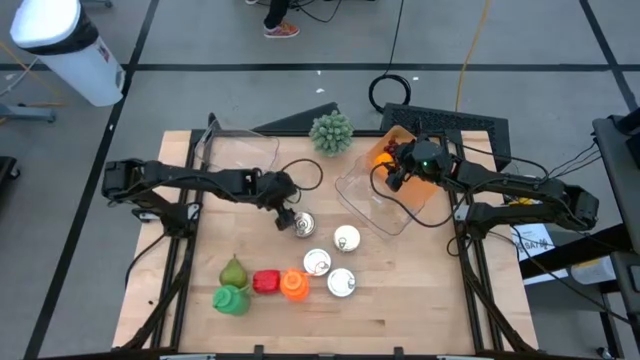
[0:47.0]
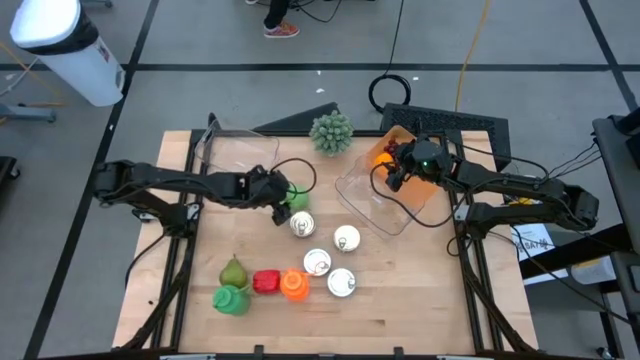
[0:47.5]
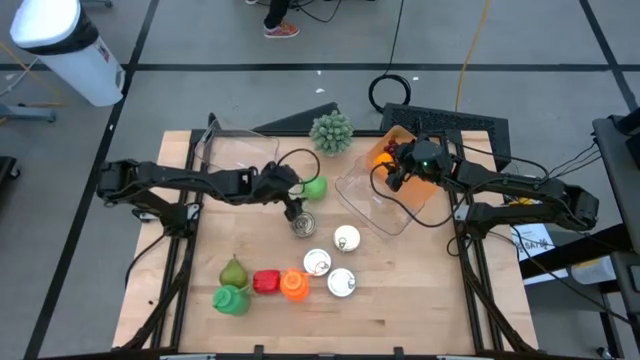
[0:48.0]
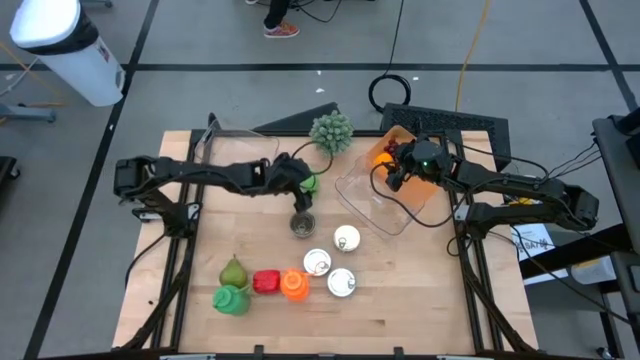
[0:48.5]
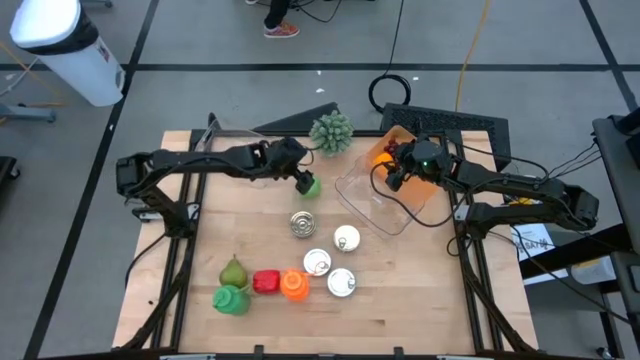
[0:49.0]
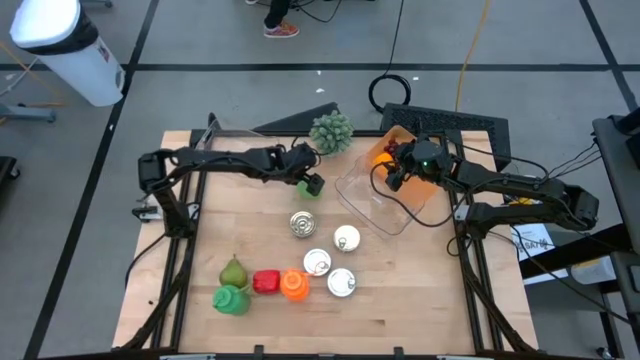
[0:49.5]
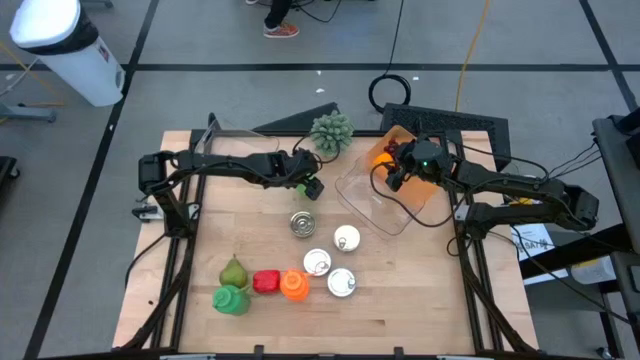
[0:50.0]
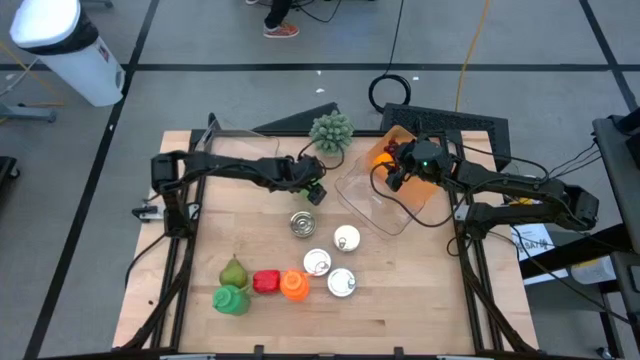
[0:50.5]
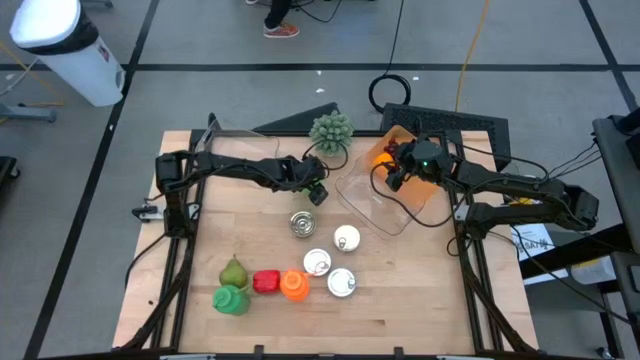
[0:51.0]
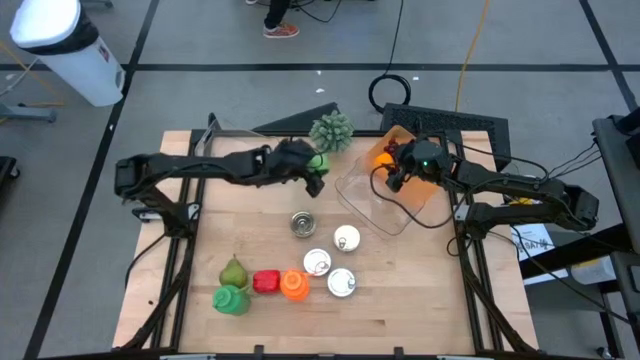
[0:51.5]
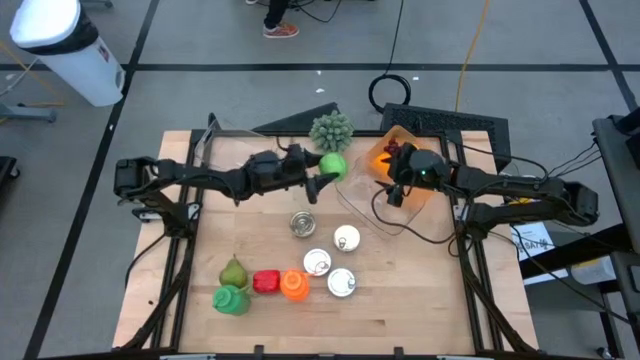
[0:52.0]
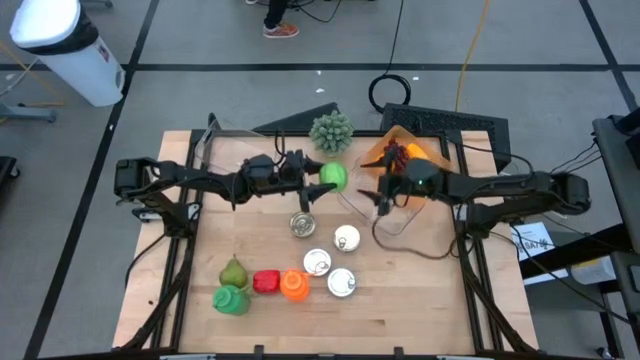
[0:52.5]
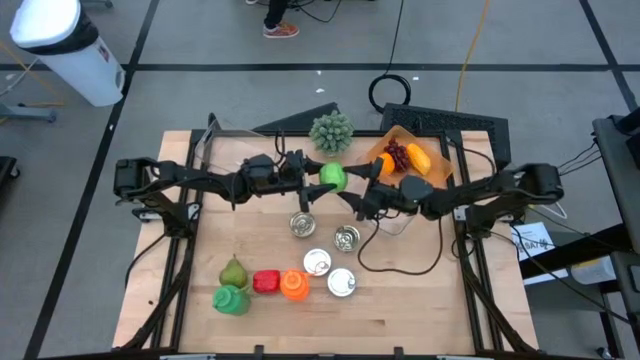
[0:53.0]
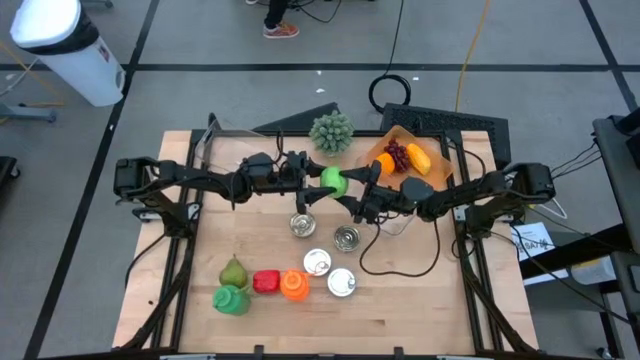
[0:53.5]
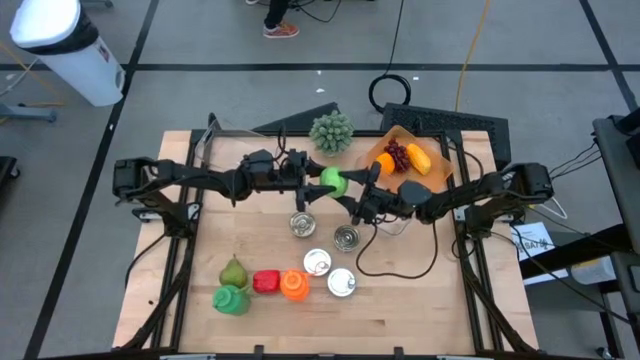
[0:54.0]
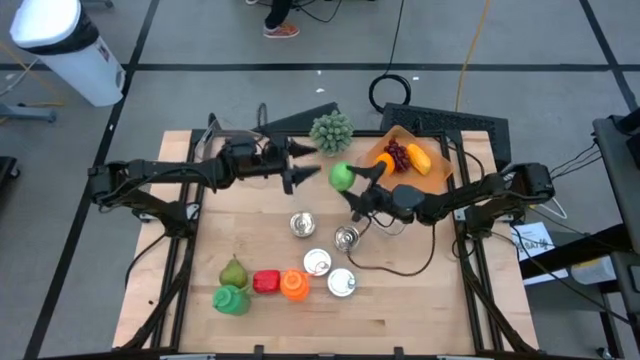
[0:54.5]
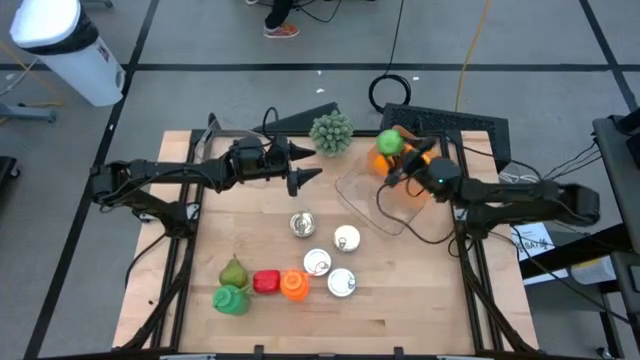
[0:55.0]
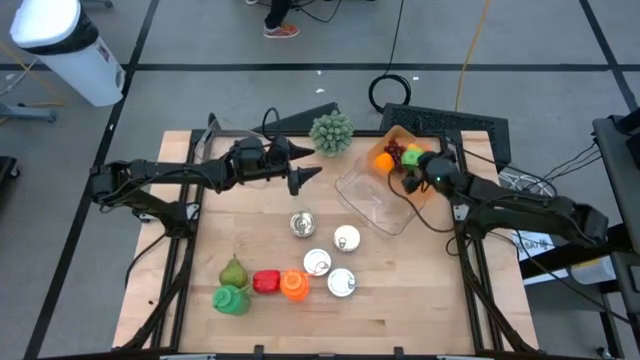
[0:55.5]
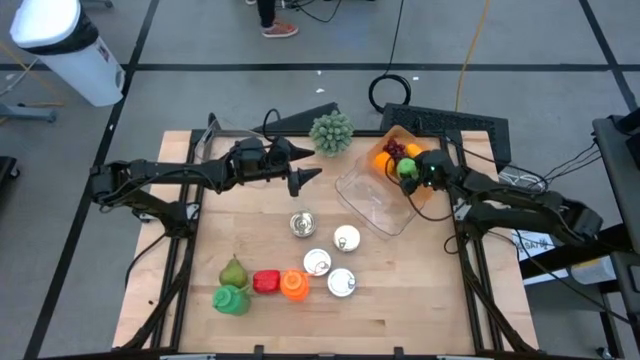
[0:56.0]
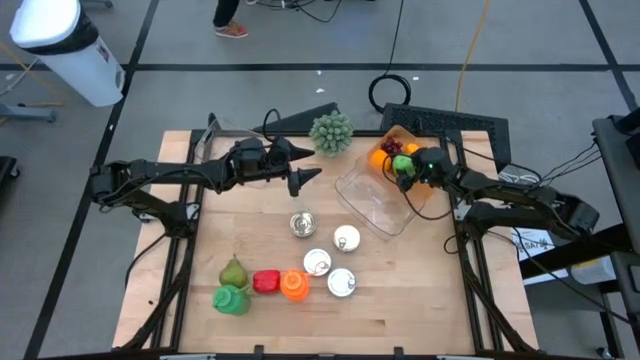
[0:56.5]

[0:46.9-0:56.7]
Task: Pick & Place Food Item
Put the green apple into the orange bin

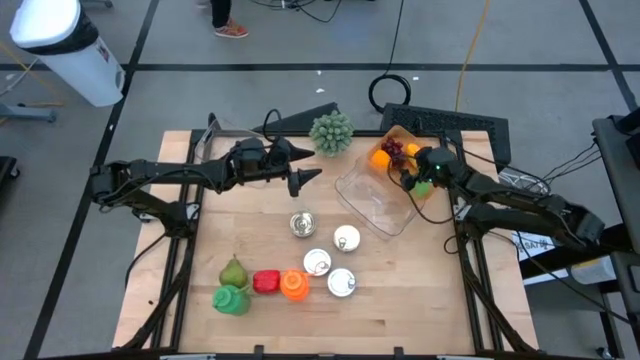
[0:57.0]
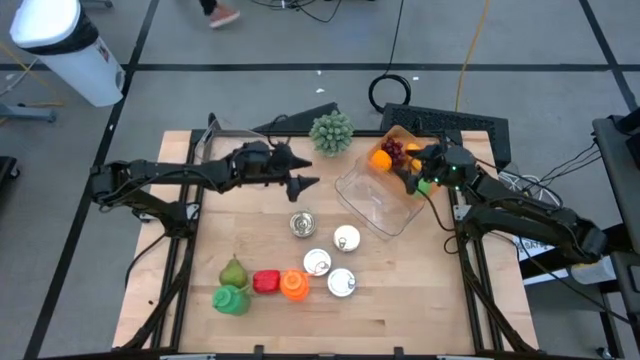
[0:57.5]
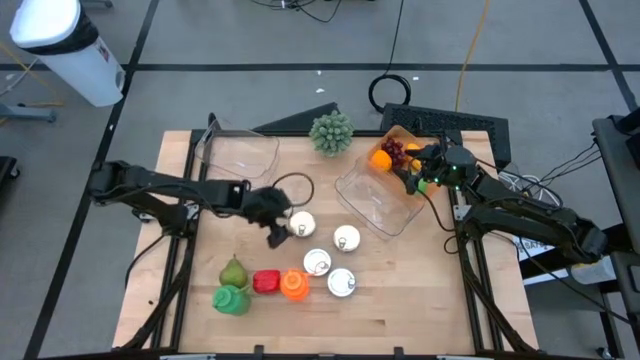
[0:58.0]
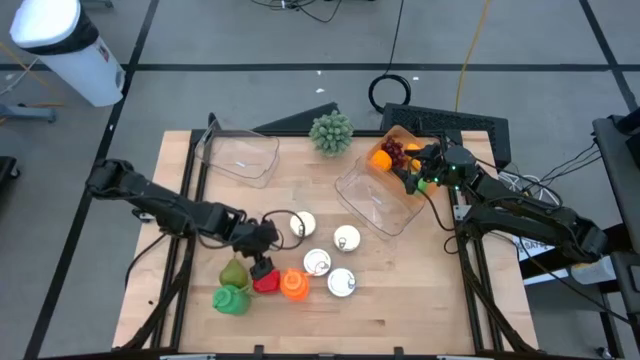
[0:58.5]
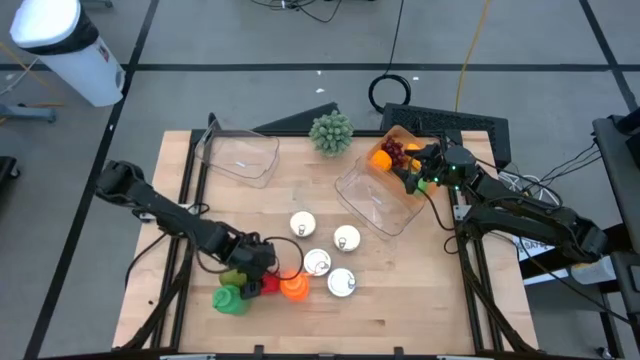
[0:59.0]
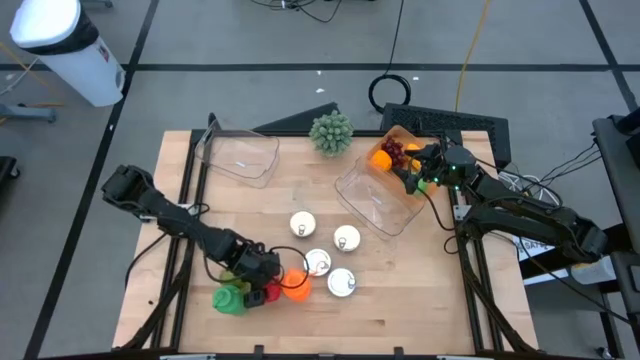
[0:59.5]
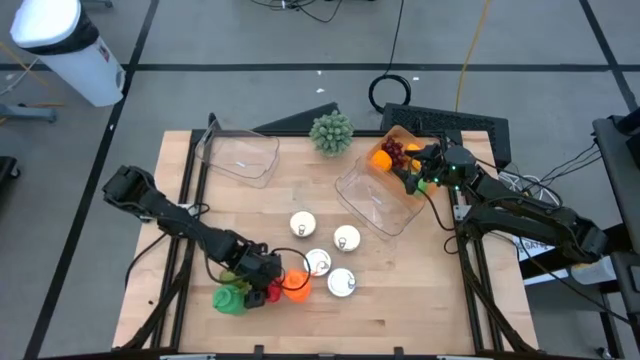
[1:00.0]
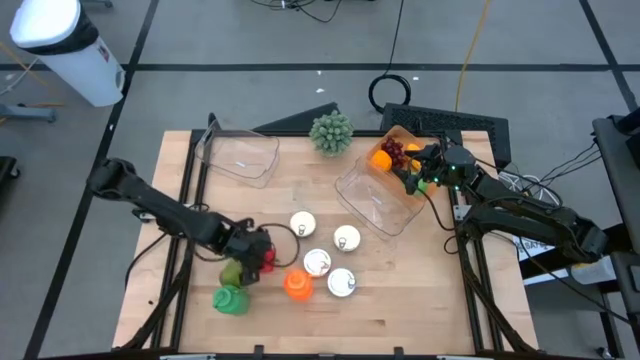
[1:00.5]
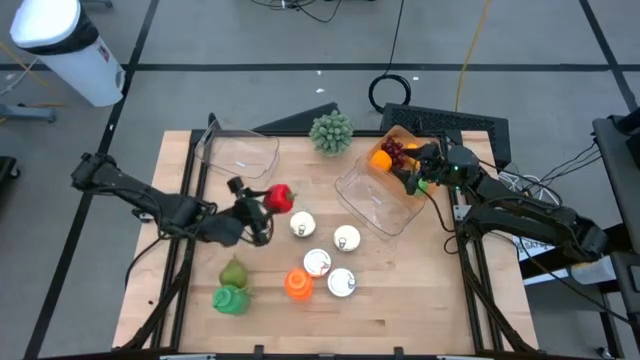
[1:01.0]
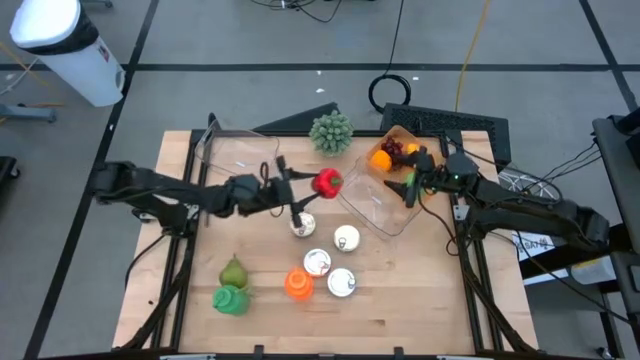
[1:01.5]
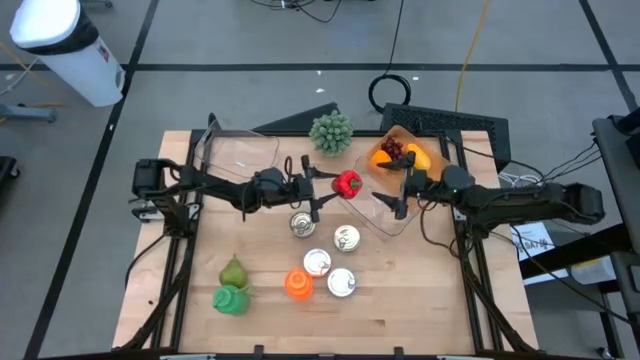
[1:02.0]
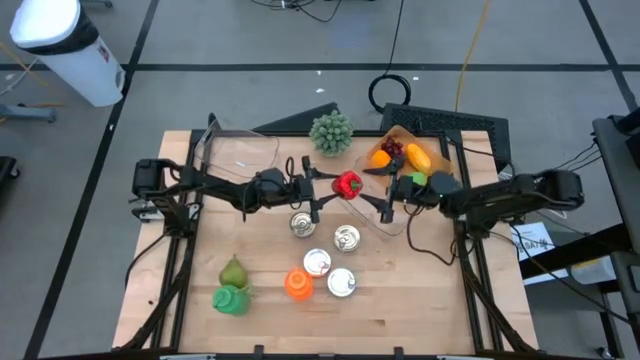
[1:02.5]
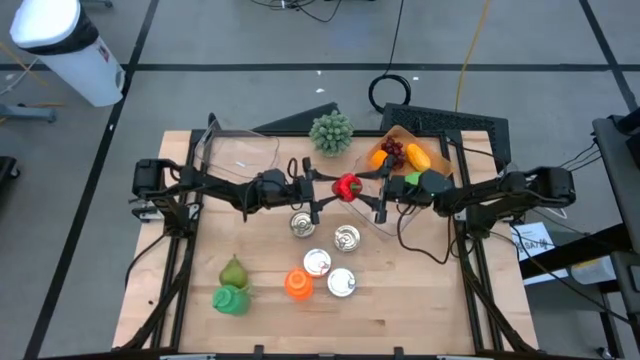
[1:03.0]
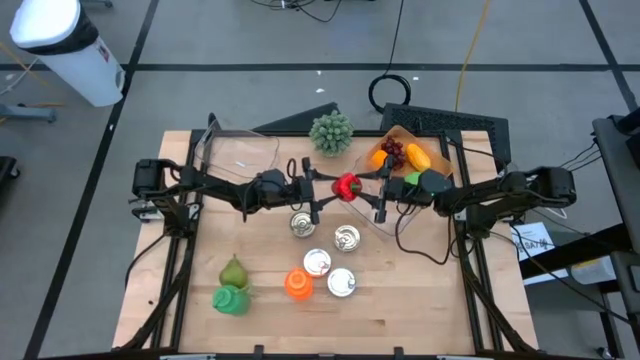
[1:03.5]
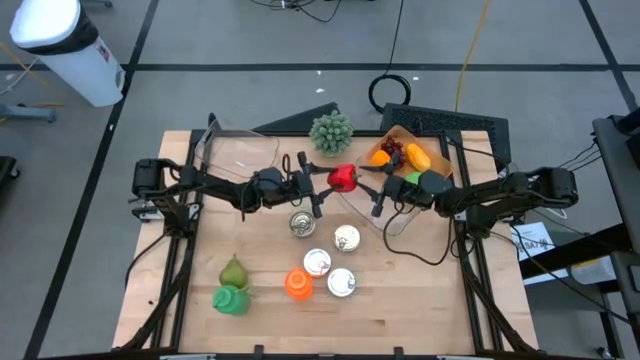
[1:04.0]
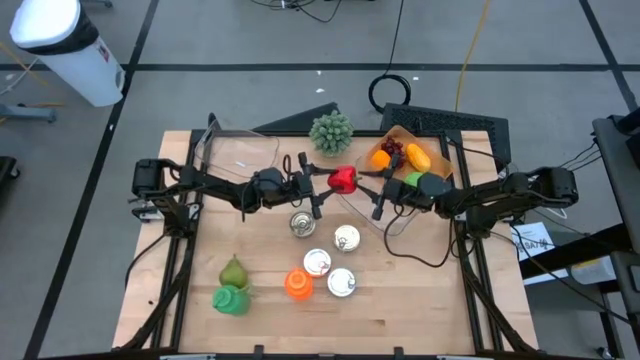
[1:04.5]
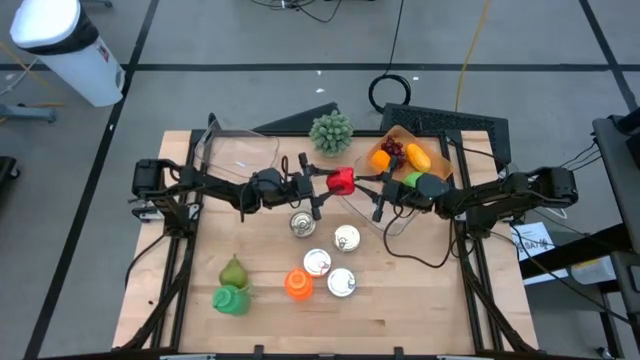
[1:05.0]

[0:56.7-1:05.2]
Put the red bell pepper into the orange bin

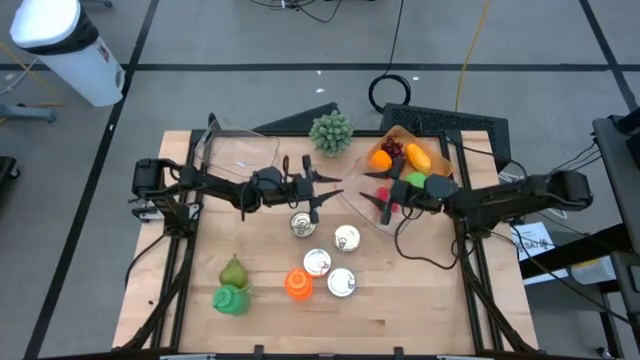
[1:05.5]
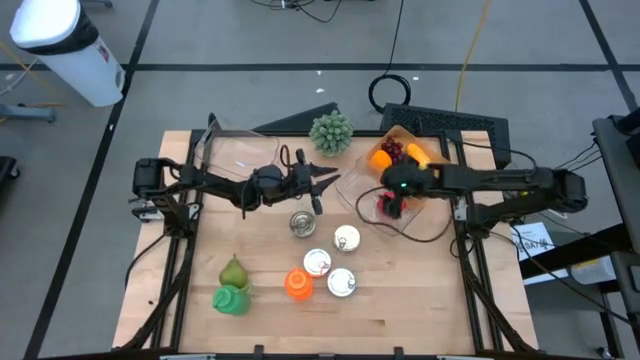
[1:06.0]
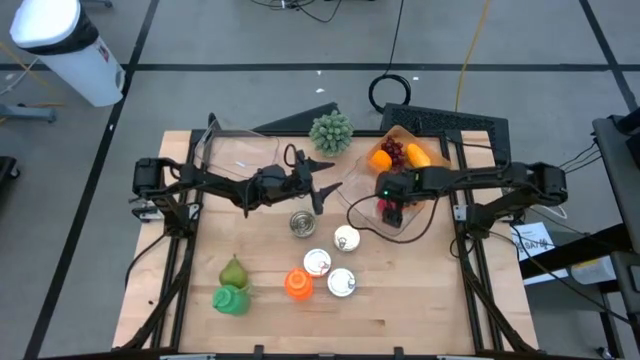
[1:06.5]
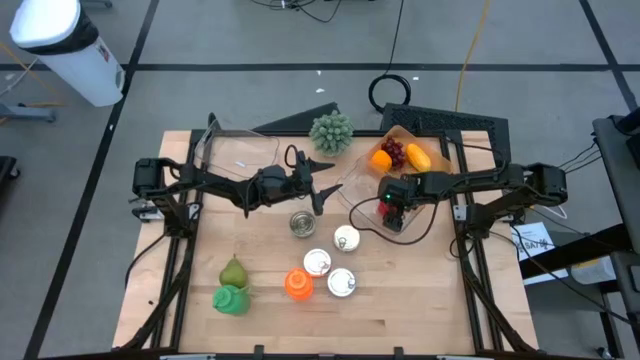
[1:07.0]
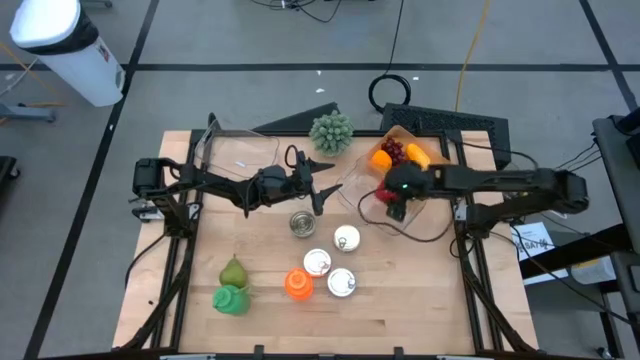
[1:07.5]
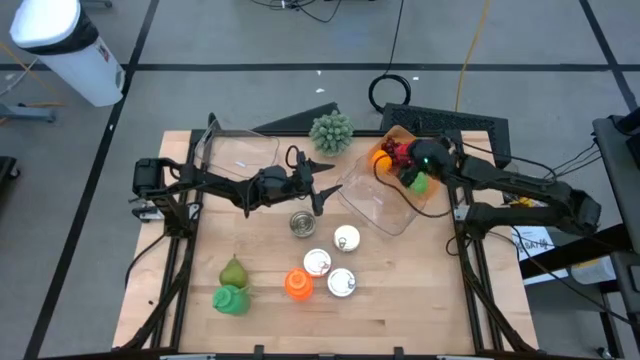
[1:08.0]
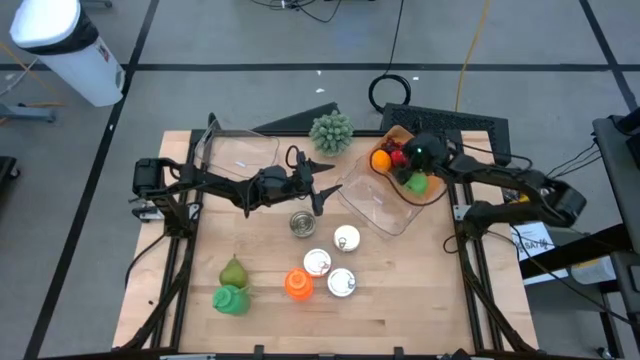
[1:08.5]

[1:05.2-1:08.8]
Put the red bell pepper into the orange bin
